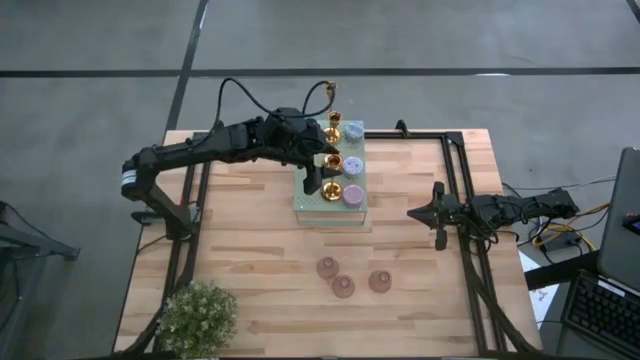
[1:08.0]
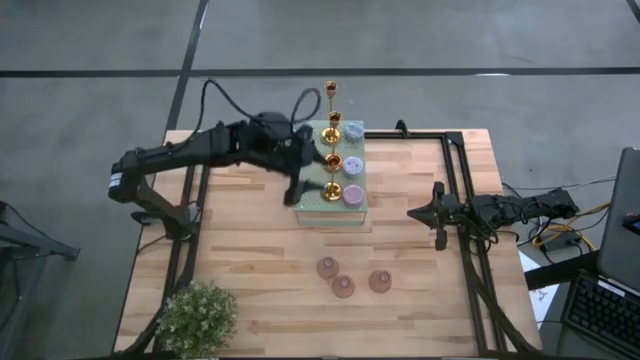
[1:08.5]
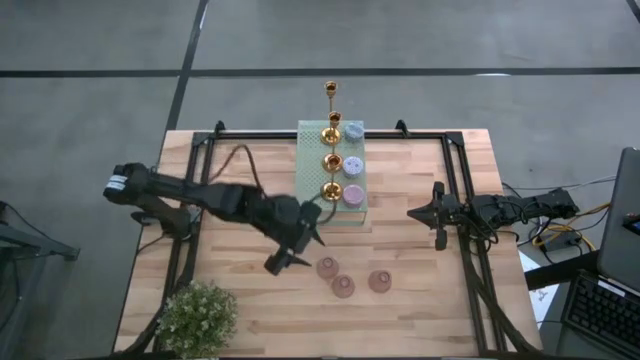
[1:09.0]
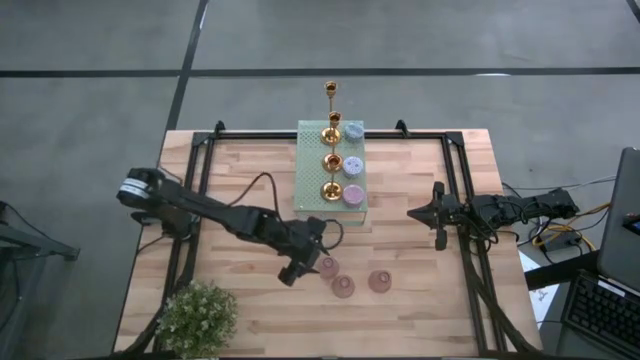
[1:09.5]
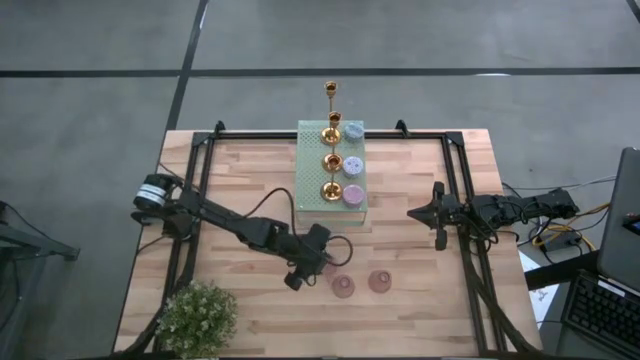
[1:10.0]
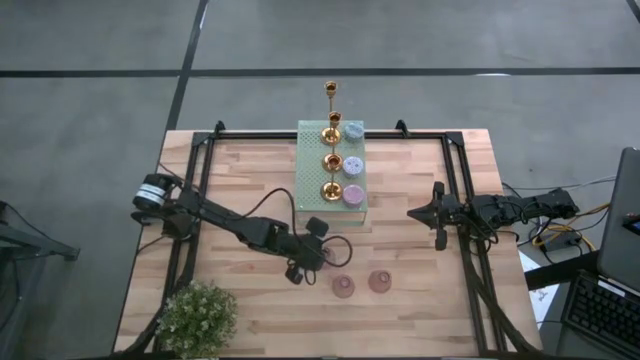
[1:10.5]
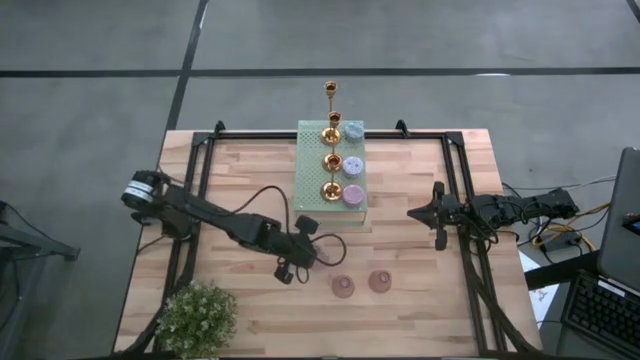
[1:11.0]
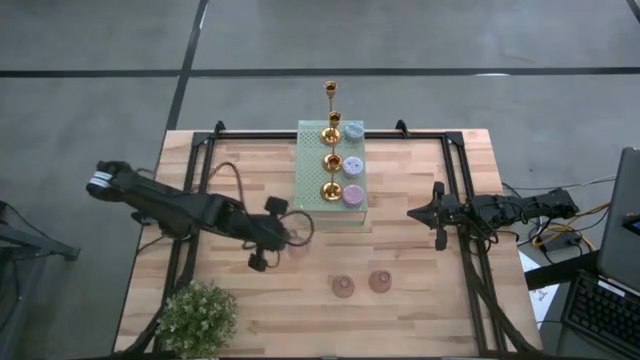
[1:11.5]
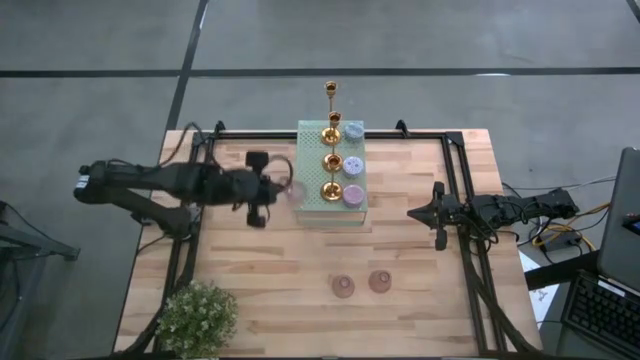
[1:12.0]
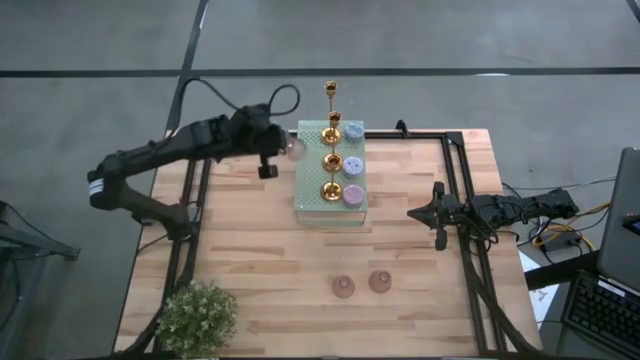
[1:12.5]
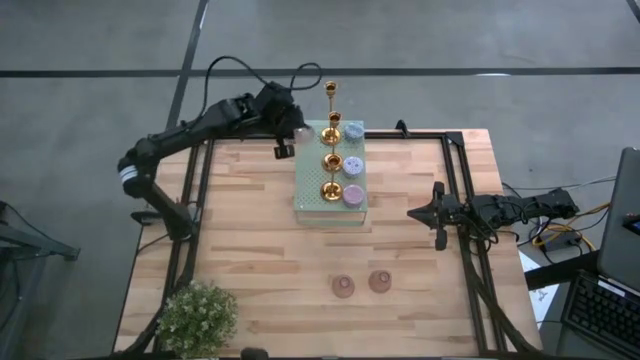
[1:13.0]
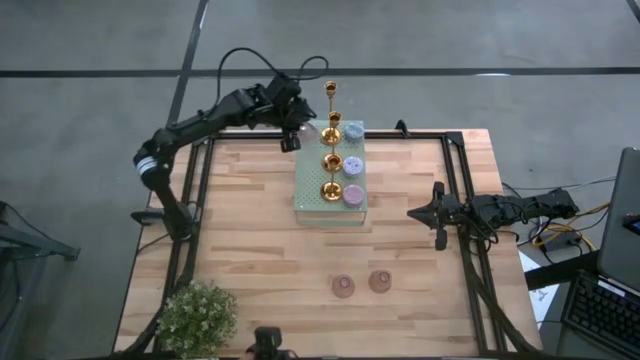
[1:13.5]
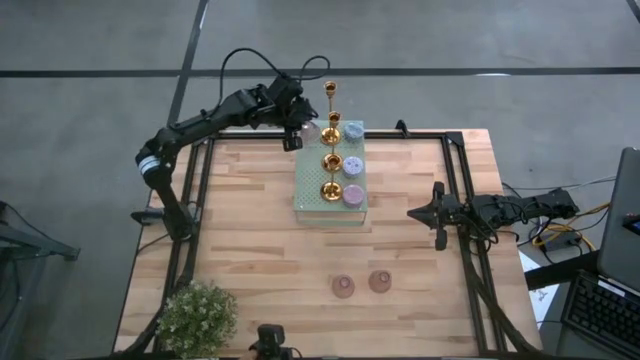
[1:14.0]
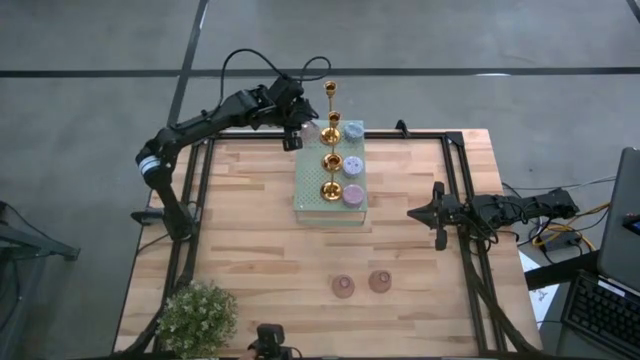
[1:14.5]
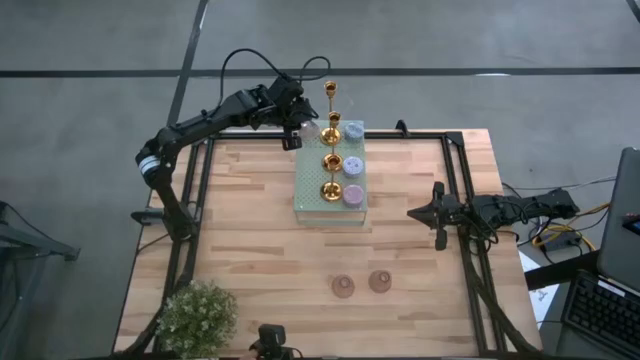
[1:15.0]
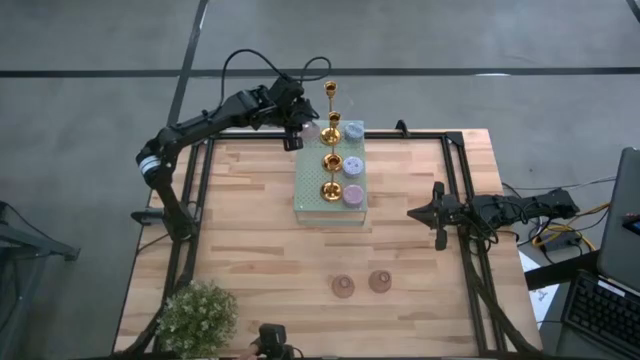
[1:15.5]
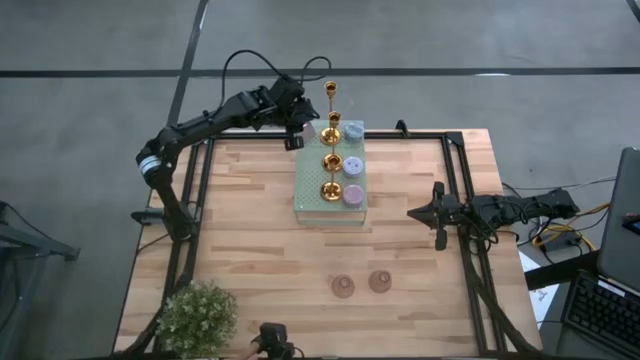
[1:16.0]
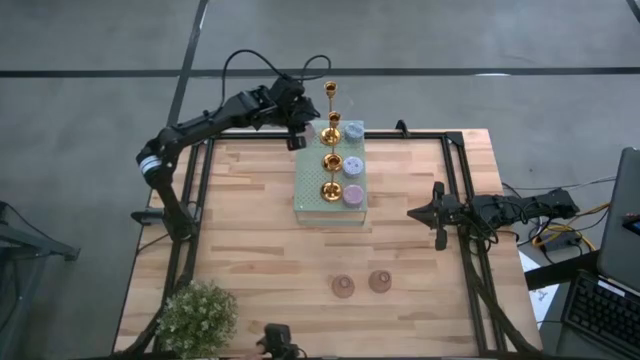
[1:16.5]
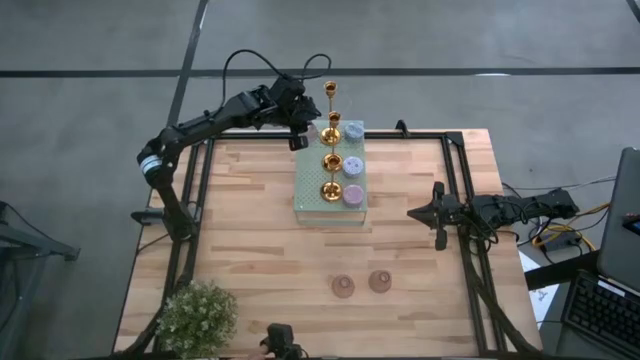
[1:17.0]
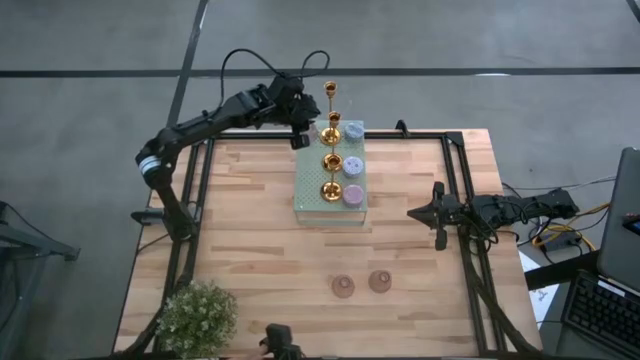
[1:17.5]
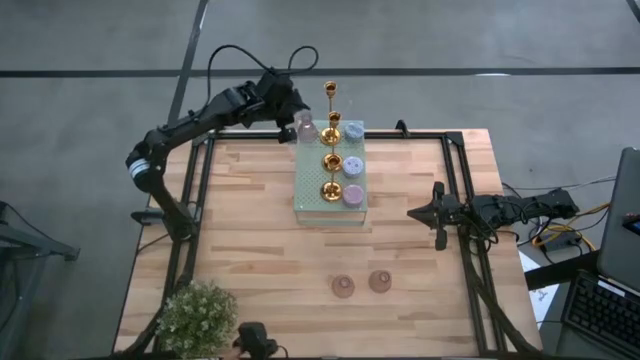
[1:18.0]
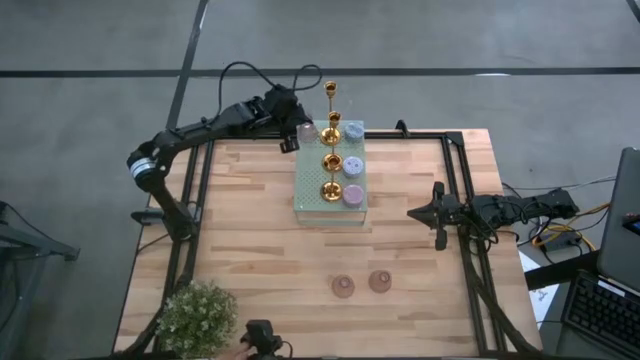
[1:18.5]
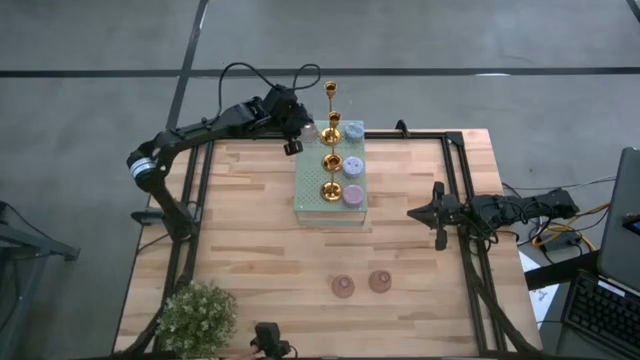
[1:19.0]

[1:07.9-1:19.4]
Task: Pick & Place candle stick holders
Put the top pink glass candle holder on the shelf

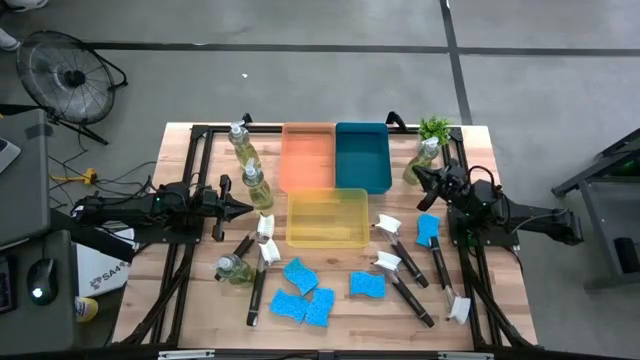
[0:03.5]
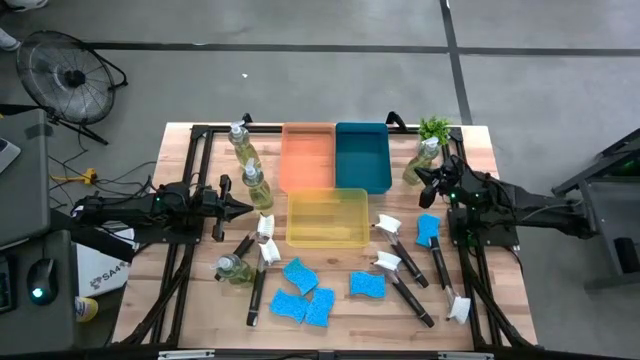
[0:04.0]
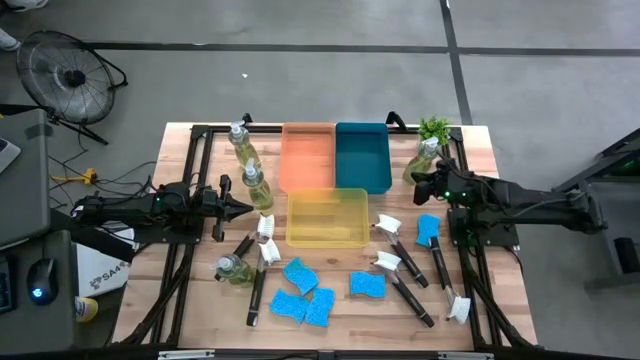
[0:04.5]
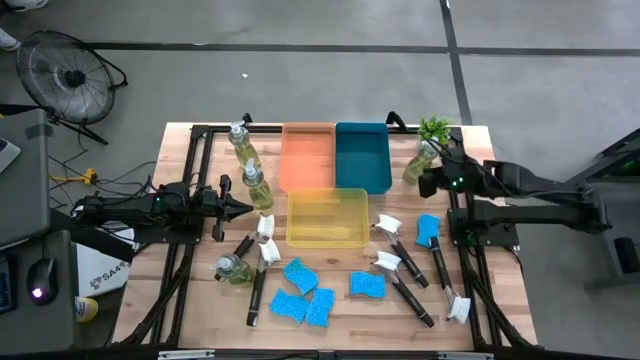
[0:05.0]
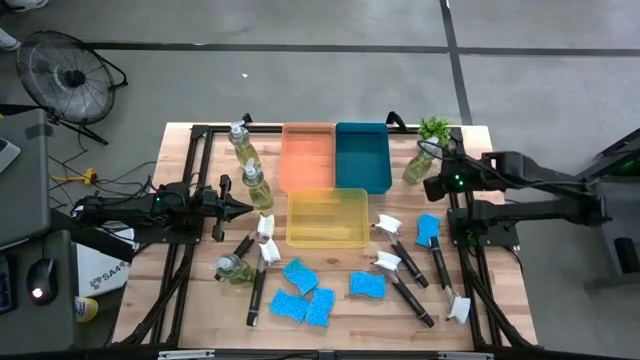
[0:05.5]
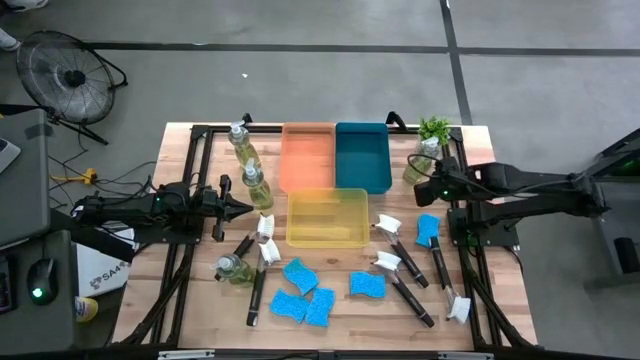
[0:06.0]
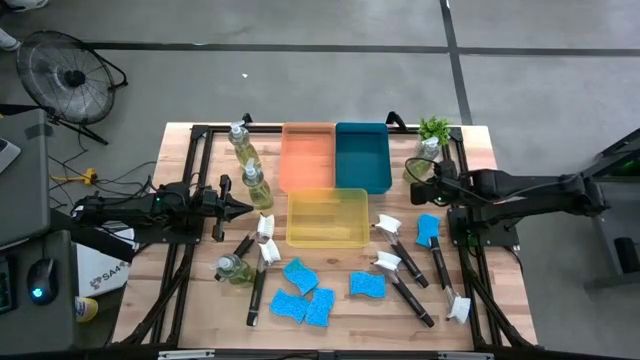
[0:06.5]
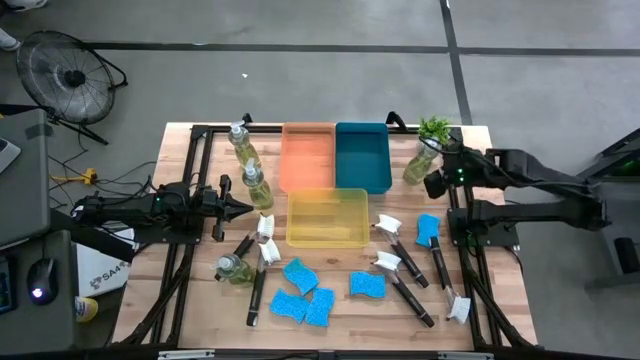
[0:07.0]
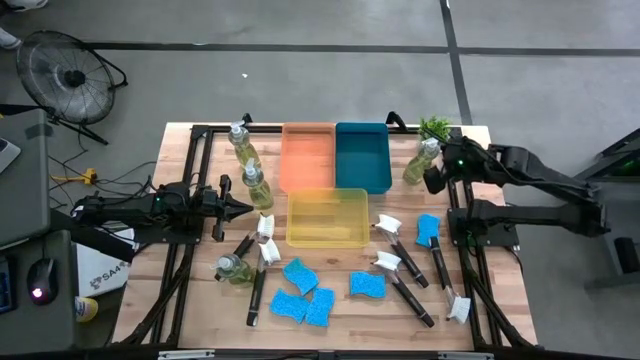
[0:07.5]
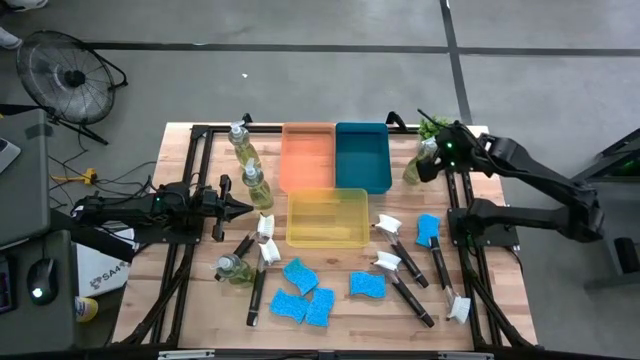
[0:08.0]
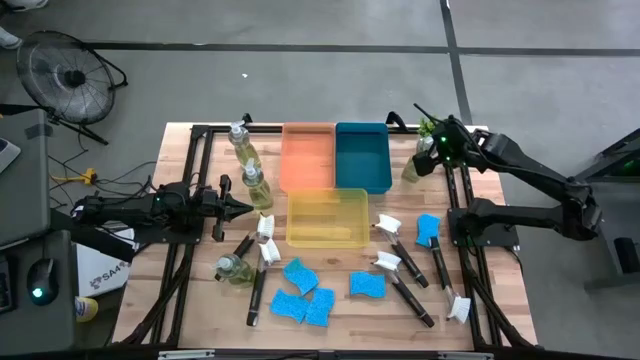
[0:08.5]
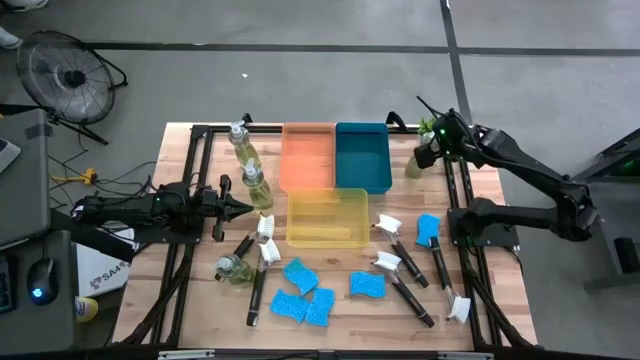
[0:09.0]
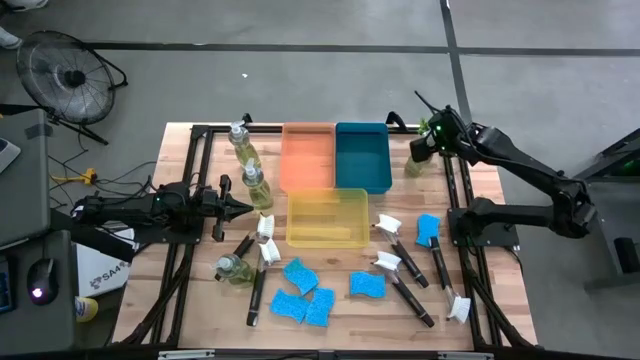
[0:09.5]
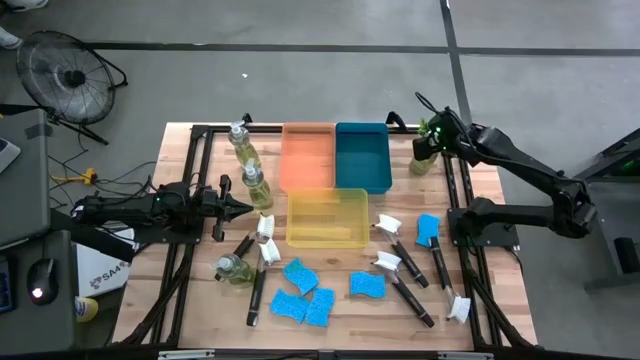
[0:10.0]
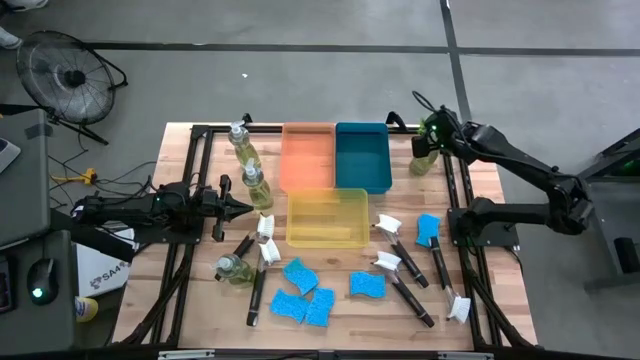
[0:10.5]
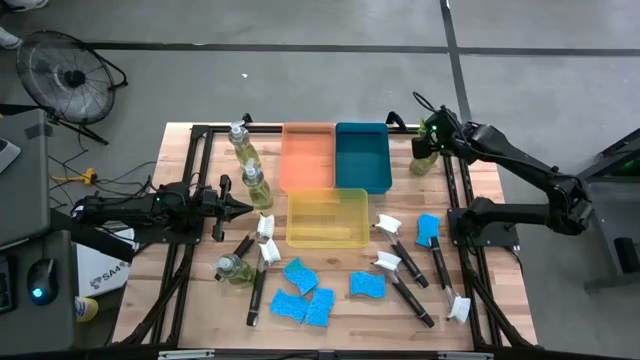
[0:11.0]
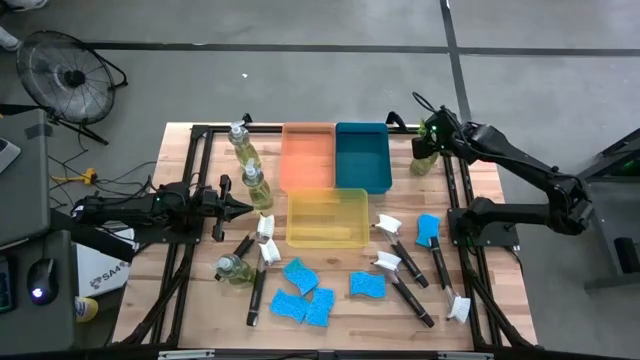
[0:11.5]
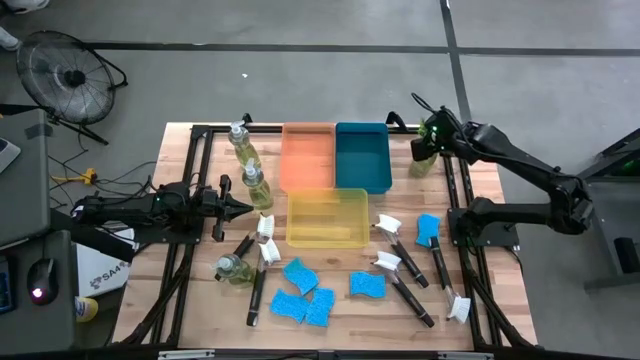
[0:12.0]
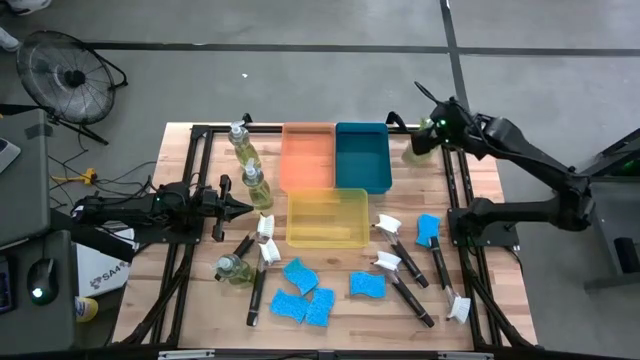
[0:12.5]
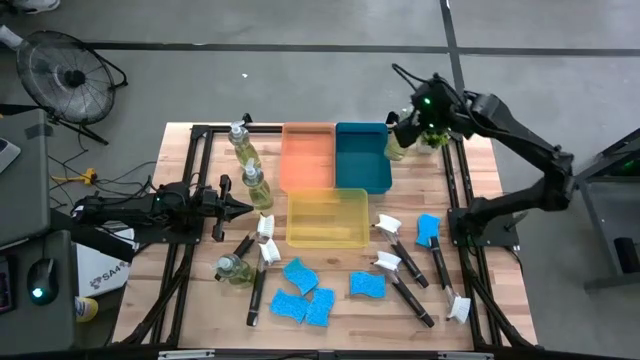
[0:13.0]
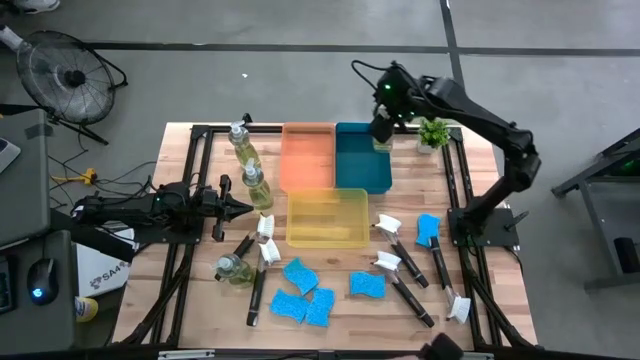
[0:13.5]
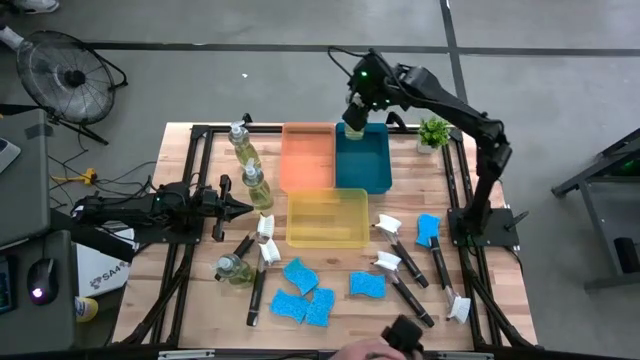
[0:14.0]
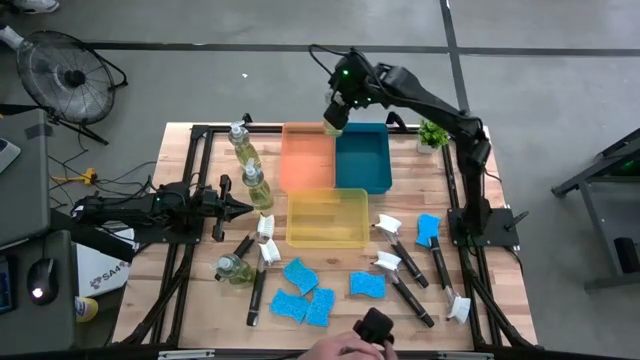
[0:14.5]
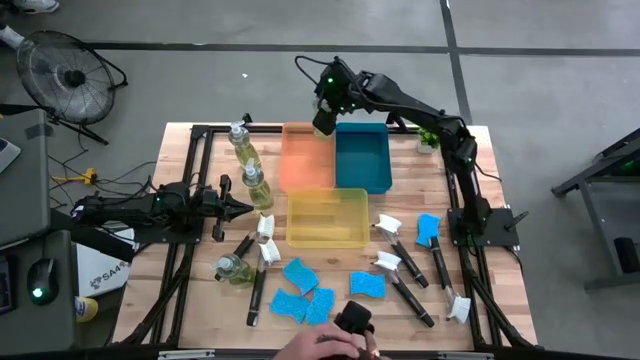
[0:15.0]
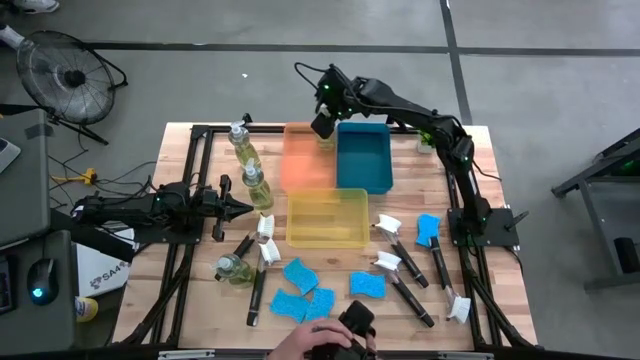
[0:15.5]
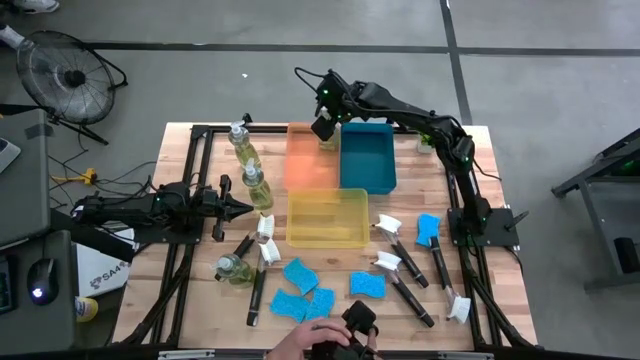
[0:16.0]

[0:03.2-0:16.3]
Task: Pick & Place Kitchen Sink Supplies
Put the dish soap into the orange bin
